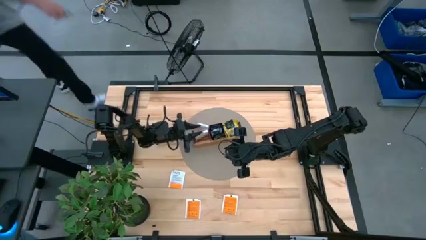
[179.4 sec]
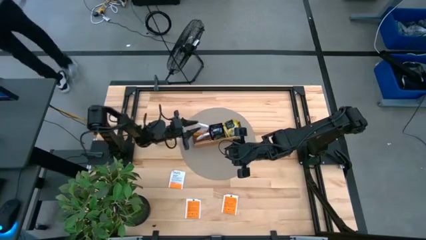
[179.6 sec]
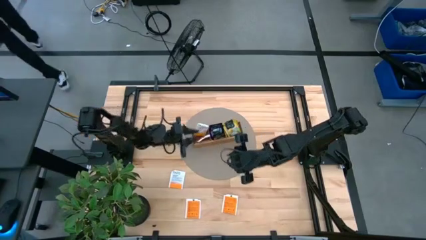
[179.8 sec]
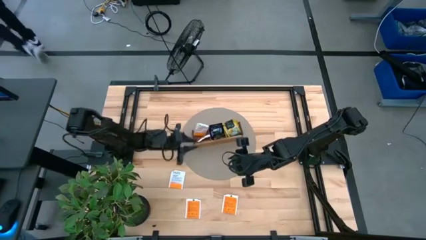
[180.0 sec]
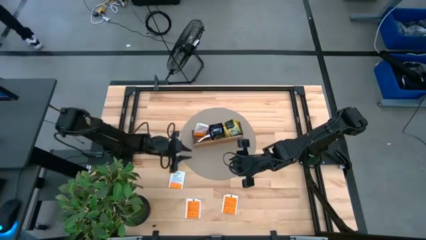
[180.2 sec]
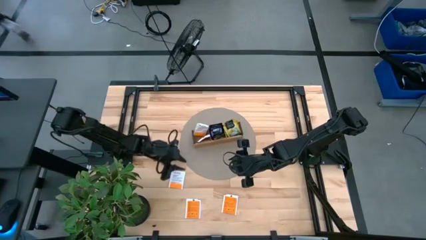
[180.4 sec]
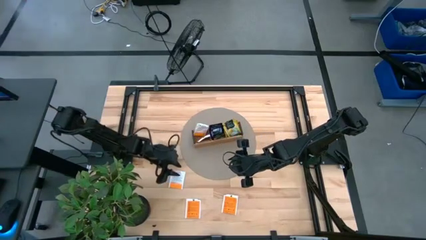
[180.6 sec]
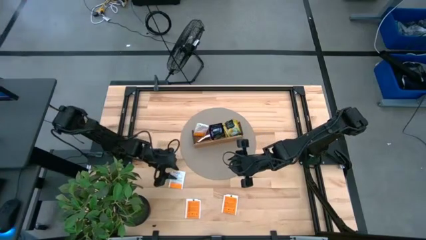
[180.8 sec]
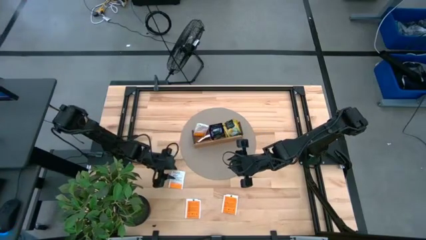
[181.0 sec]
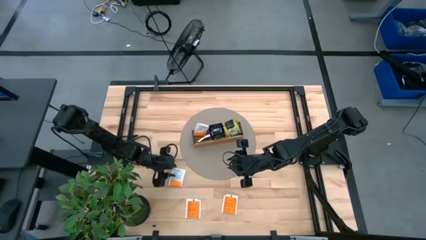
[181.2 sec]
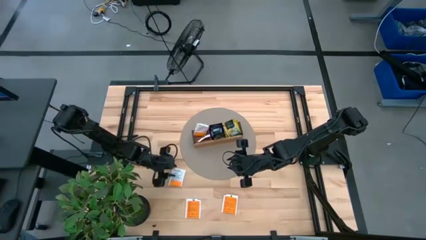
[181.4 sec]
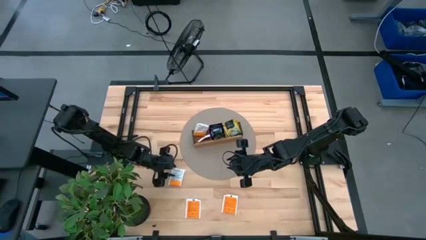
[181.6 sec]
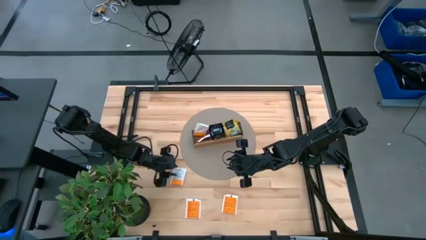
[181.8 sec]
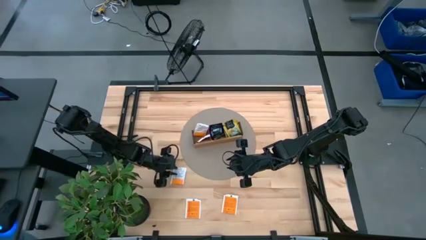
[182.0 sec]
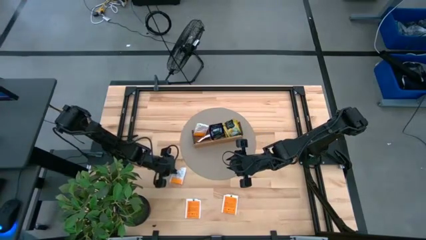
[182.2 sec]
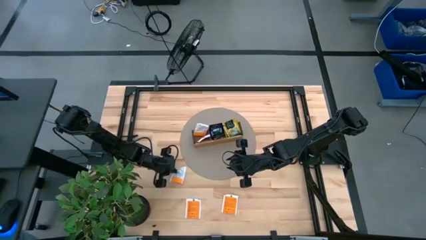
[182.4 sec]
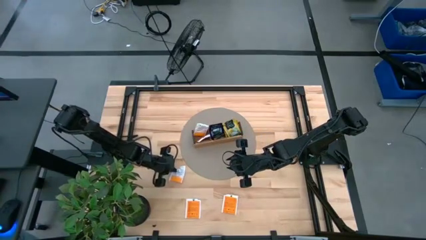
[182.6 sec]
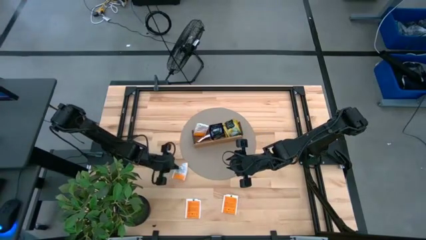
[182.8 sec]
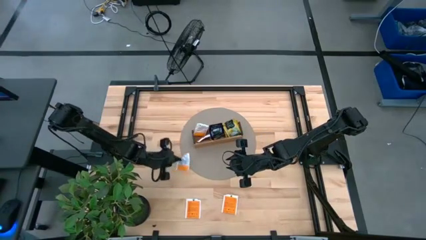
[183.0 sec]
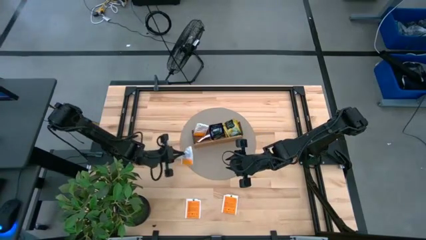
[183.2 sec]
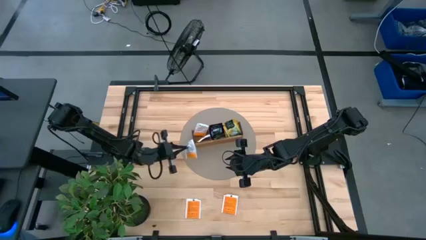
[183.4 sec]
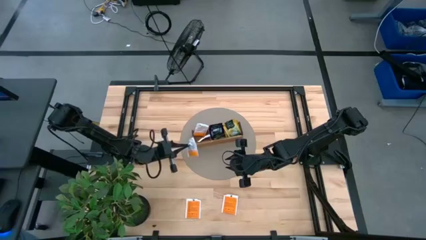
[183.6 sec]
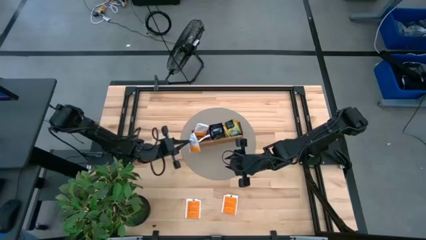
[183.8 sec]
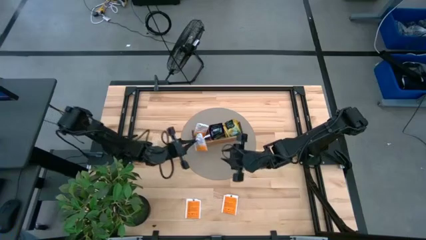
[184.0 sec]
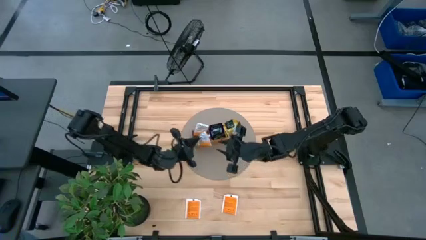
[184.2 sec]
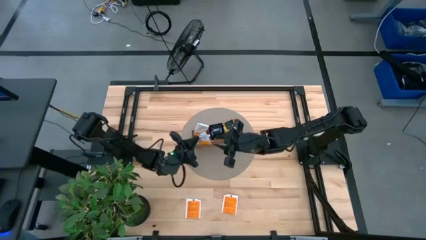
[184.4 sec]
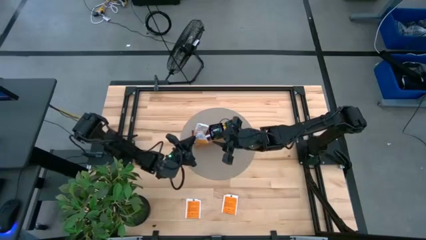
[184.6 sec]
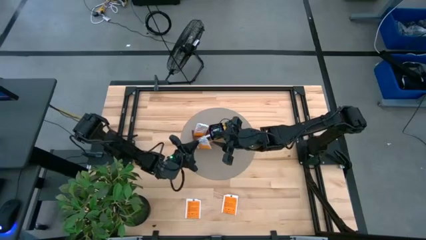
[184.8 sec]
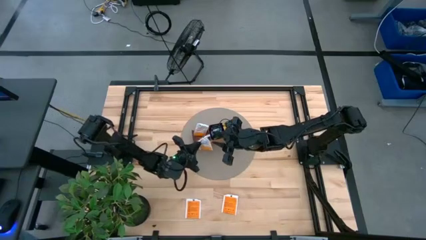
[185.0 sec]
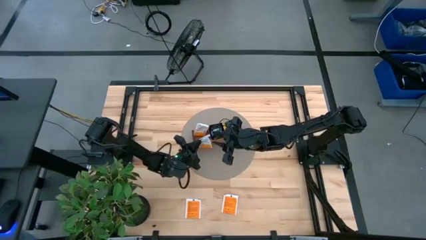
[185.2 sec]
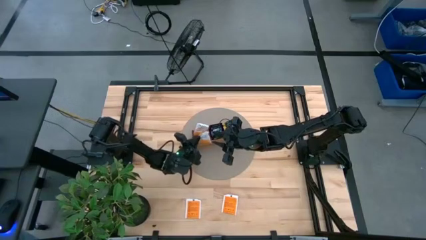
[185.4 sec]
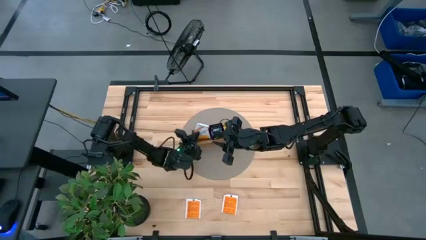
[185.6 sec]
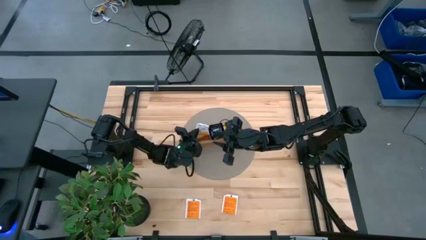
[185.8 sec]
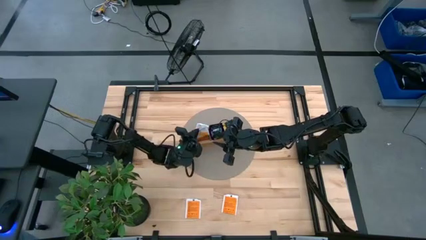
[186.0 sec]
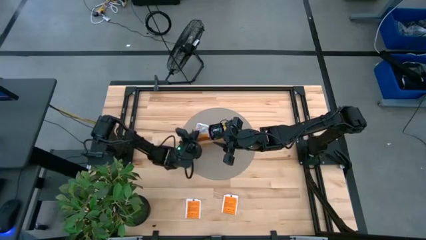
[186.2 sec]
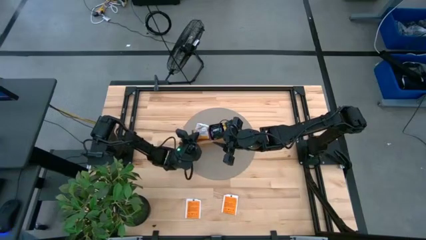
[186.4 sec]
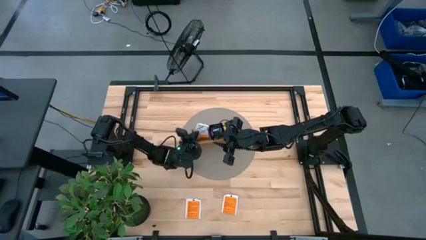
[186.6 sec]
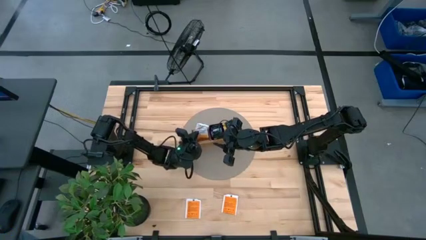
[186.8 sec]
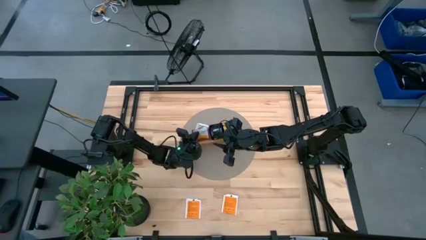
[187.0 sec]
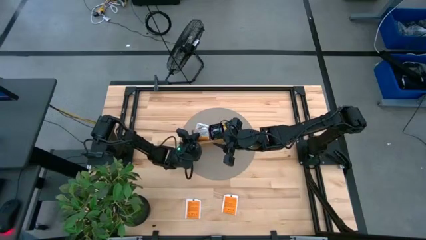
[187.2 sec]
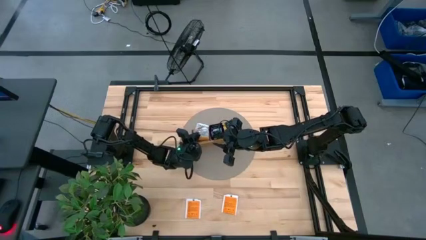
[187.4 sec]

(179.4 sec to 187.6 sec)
Task: Pick & Place Tea
Put the white tea bag into the left section of the wooden organizer

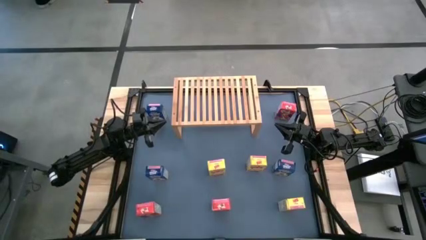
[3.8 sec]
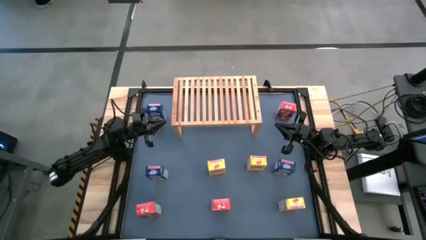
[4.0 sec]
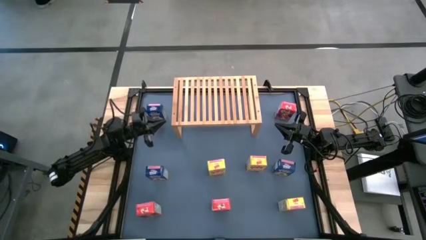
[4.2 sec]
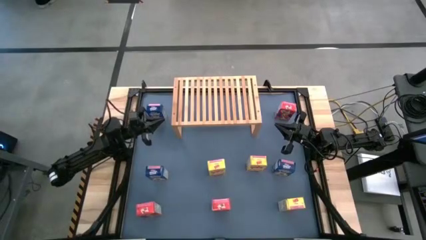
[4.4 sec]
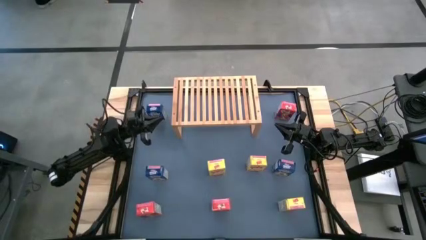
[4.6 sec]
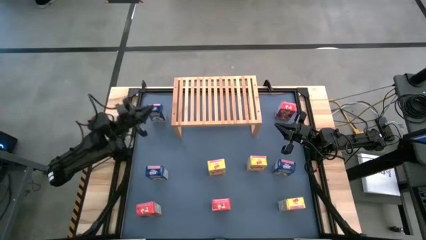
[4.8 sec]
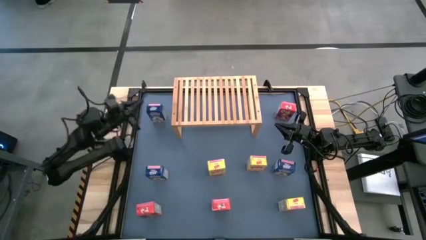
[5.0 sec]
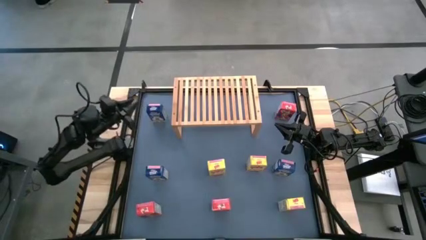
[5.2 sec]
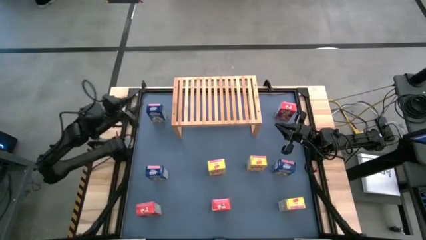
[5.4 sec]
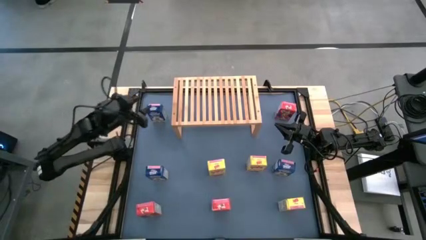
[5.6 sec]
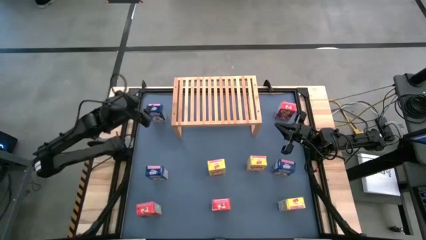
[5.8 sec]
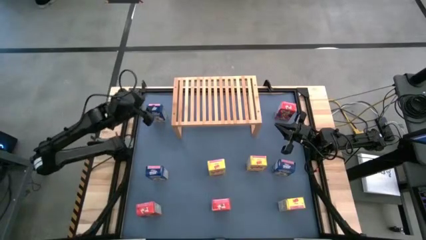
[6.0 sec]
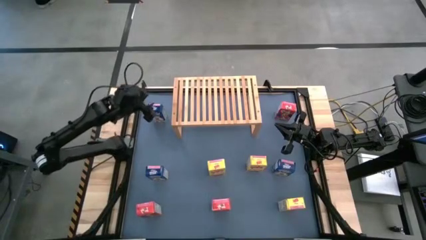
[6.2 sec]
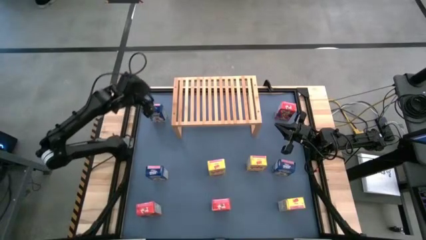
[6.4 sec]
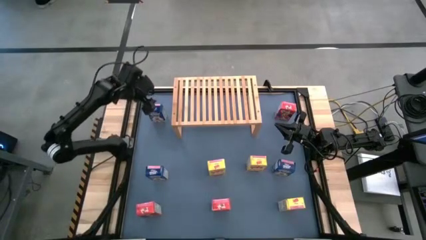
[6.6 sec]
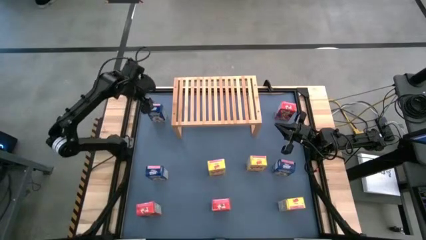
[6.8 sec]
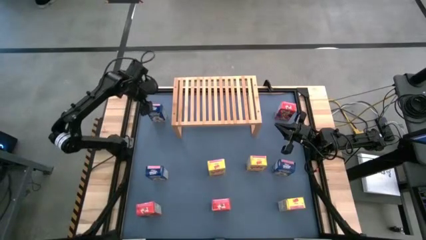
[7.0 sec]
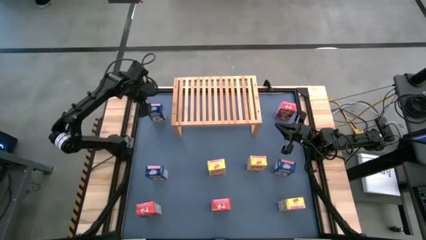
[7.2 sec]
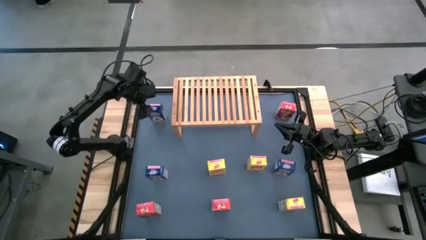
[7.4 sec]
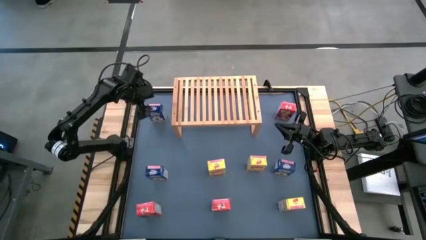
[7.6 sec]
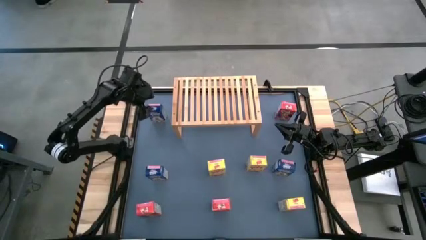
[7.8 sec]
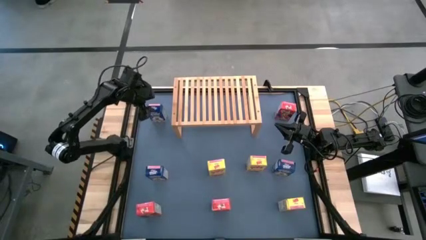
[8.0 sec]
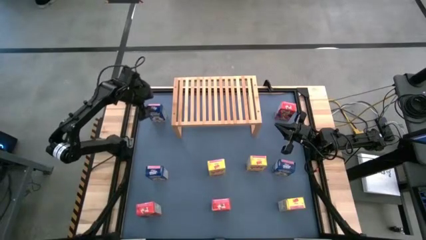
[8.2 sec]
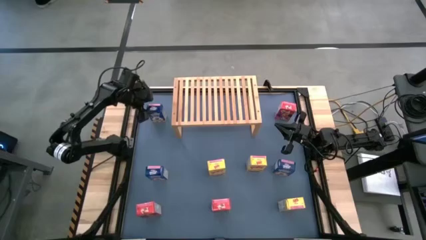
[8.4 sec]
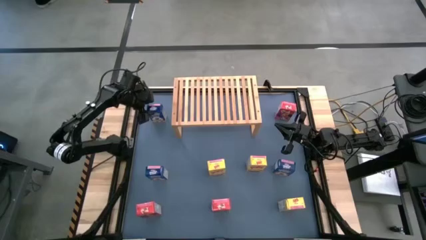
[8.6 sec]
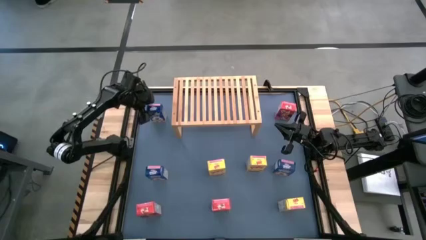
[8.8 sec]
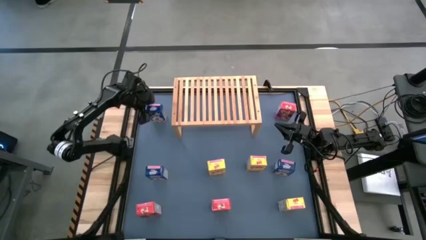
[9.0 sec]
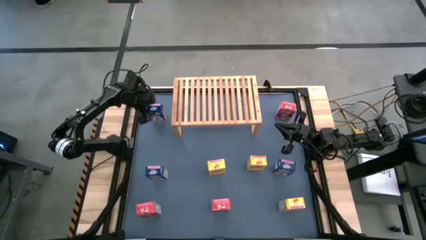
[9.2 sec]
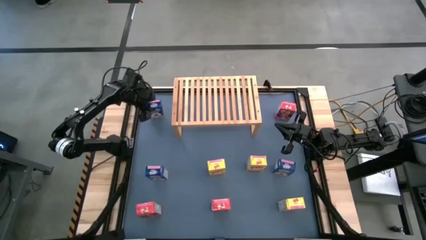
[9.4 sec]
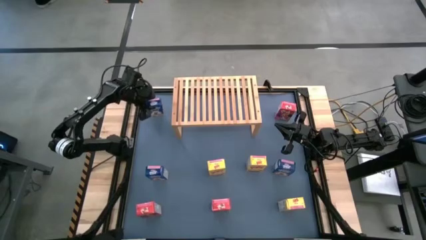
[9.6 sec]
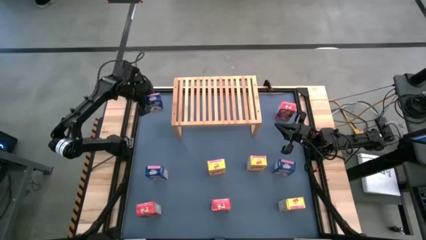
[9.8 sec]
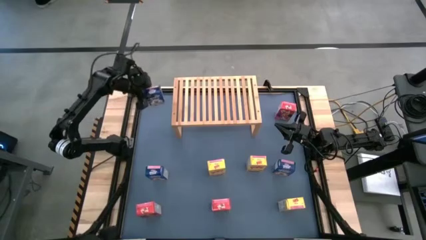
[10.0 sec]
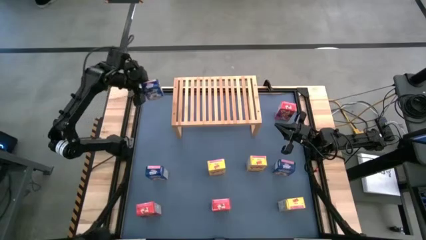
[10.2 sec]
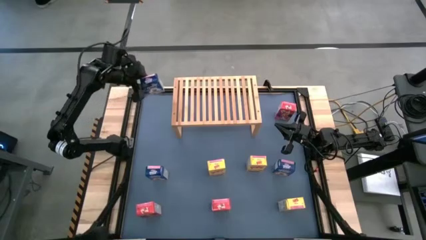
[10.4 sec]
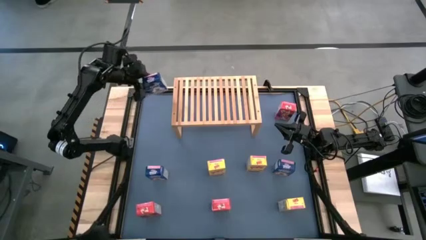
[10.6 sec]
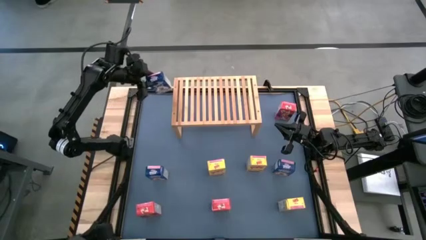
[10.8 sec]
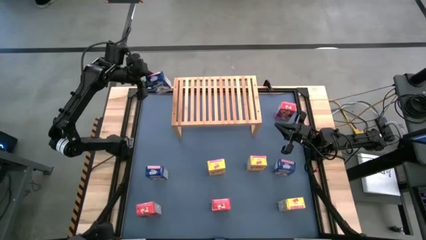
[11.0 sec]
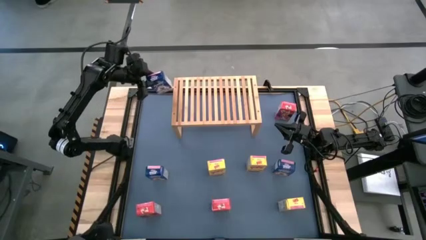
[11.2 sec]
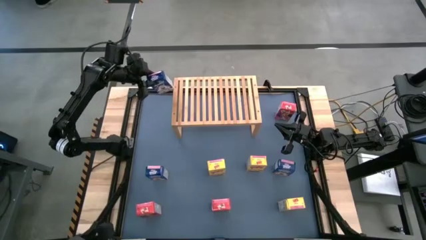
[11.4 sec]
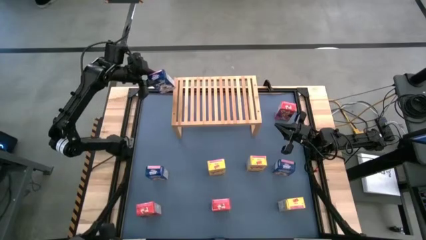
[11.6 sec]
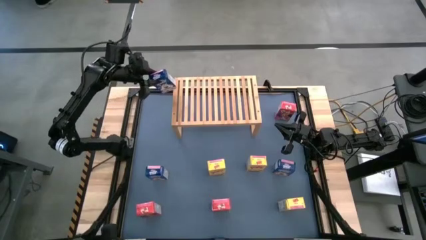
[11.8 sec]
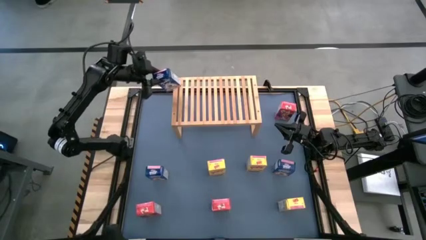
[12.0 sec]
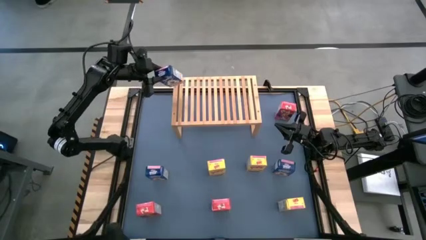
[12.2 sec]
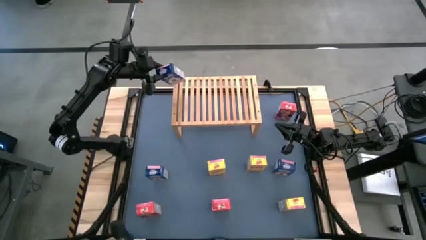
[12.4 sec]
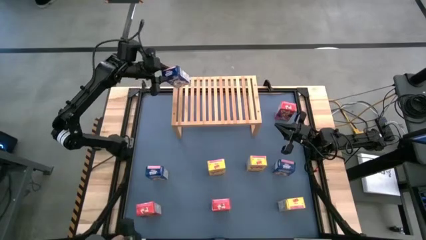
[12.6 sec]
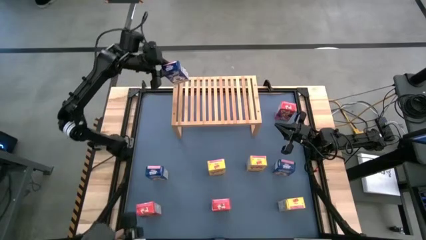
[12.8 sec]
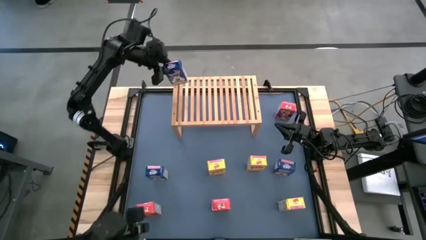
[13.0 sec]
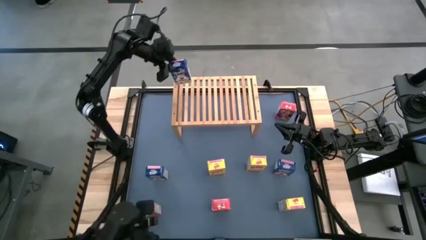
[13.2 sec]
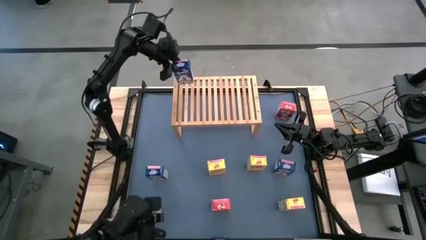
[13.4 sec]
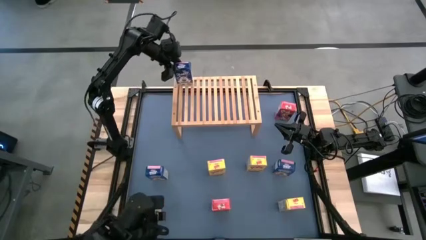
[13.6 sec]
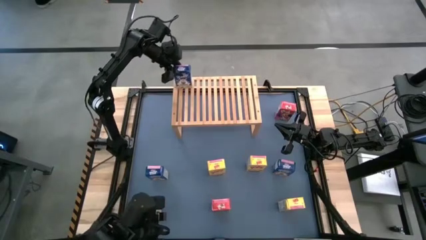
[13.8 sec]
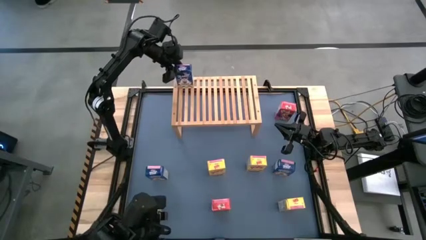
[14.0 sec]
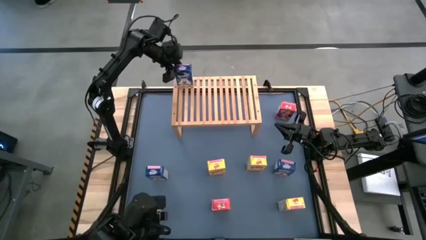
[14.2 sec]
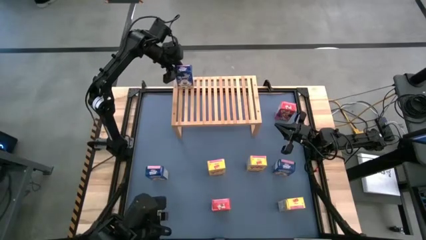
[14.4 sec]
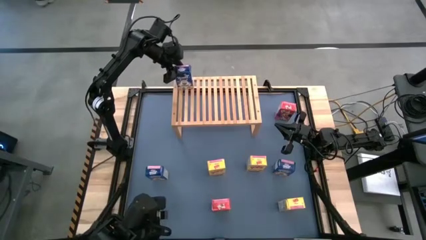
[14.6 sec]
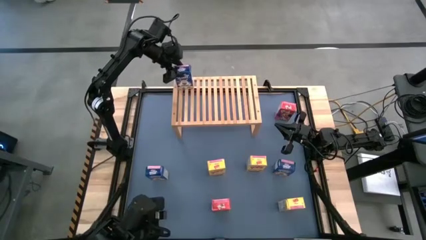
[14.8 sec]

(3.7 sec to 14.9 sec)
Task: Stack cereal on shelf
Put the top left blue cereal box on the shelf
